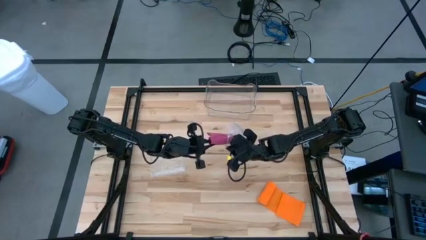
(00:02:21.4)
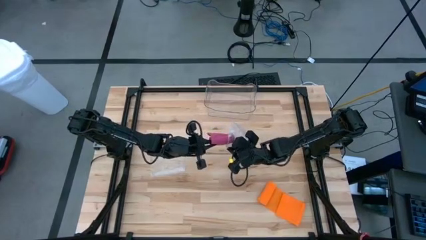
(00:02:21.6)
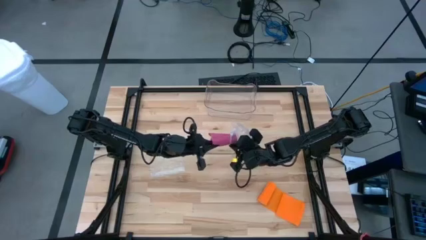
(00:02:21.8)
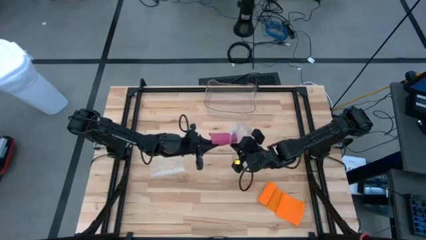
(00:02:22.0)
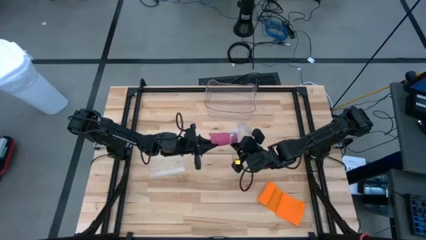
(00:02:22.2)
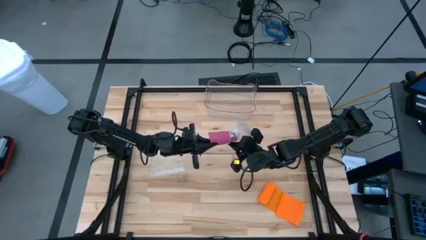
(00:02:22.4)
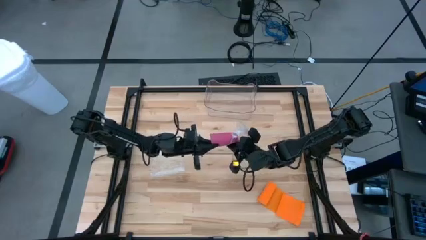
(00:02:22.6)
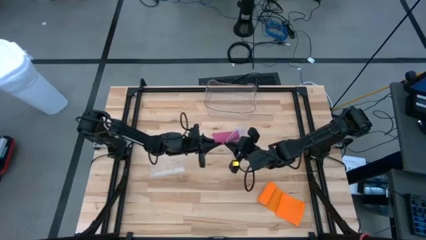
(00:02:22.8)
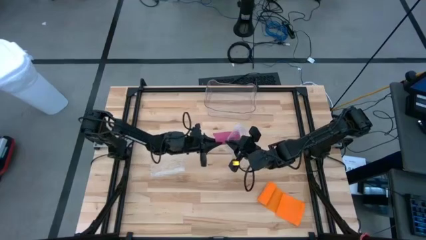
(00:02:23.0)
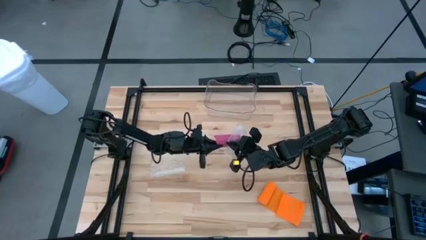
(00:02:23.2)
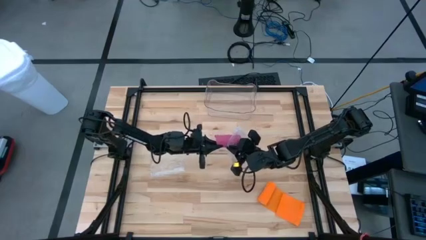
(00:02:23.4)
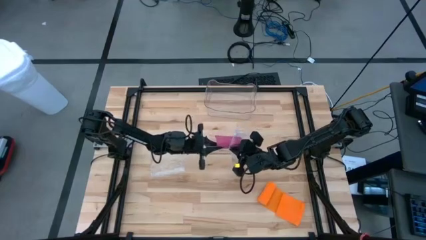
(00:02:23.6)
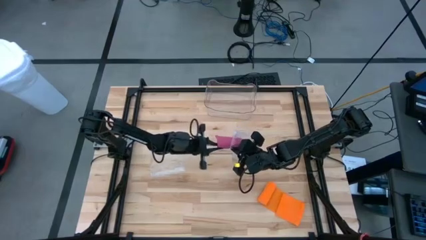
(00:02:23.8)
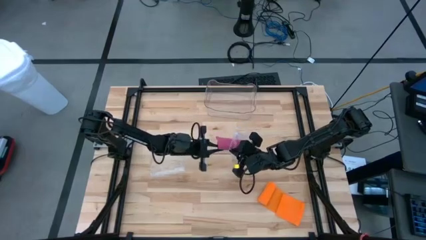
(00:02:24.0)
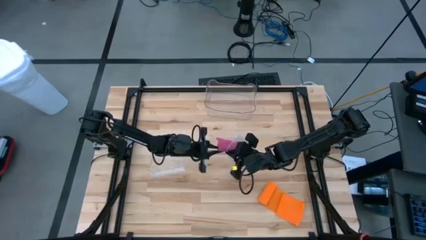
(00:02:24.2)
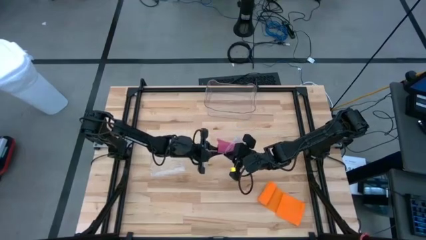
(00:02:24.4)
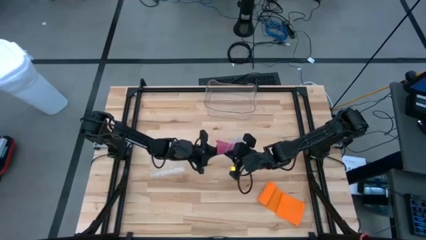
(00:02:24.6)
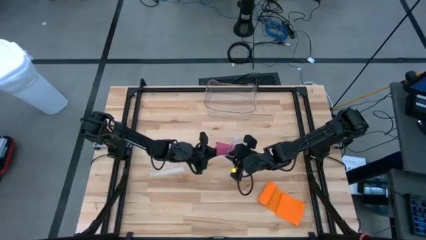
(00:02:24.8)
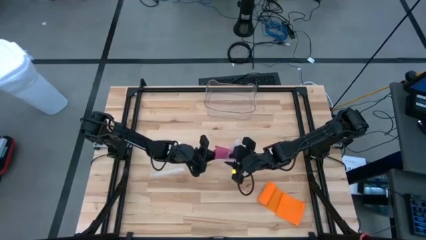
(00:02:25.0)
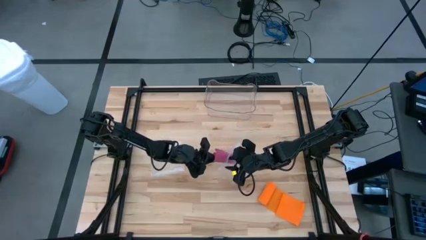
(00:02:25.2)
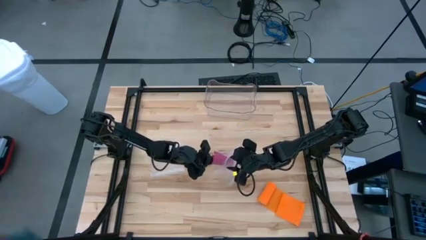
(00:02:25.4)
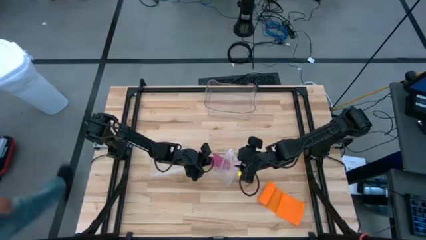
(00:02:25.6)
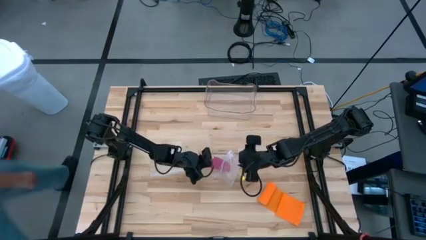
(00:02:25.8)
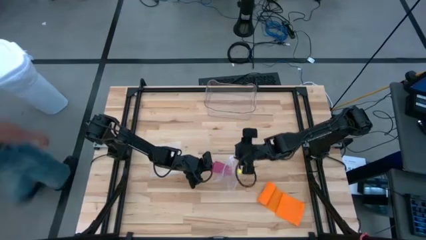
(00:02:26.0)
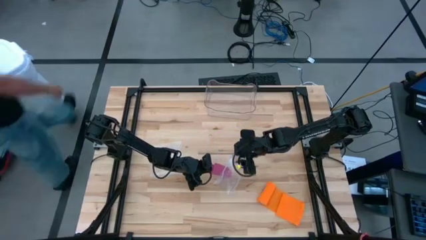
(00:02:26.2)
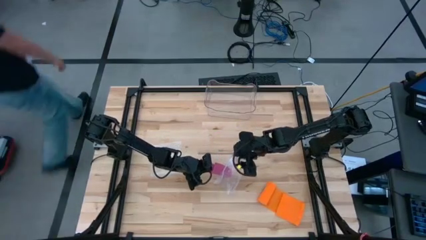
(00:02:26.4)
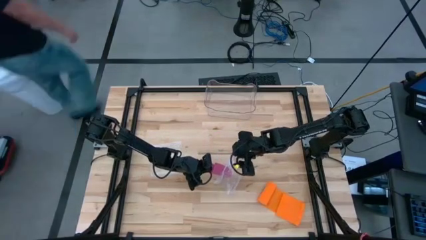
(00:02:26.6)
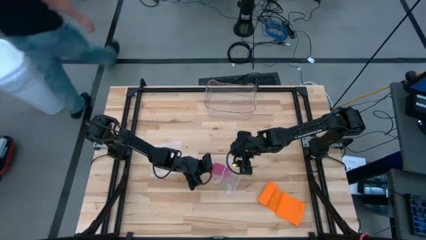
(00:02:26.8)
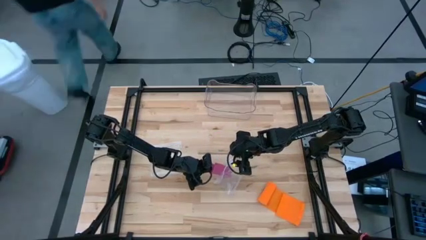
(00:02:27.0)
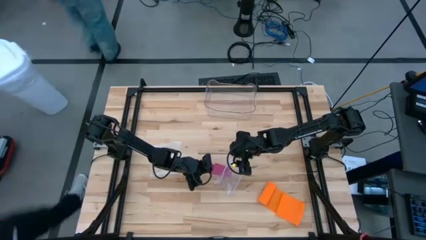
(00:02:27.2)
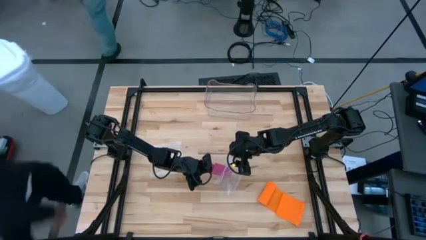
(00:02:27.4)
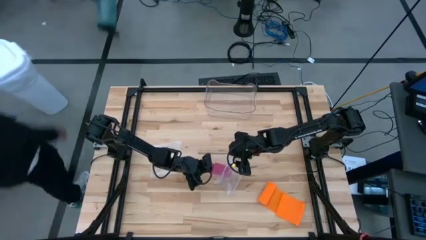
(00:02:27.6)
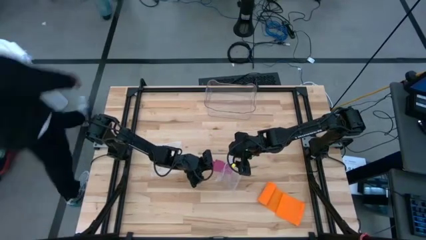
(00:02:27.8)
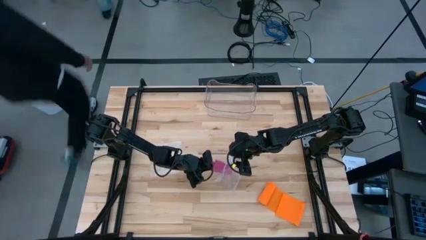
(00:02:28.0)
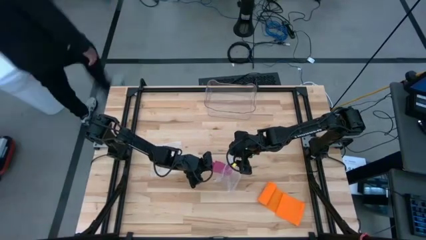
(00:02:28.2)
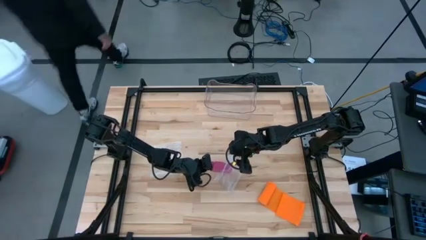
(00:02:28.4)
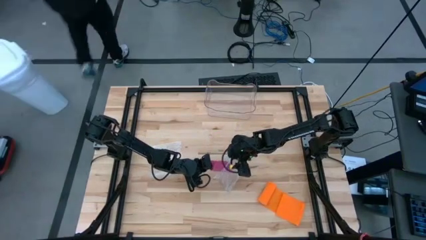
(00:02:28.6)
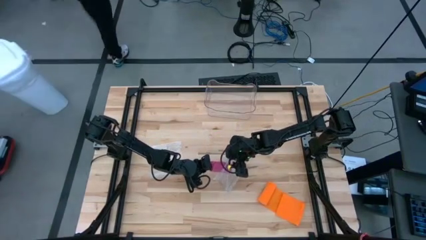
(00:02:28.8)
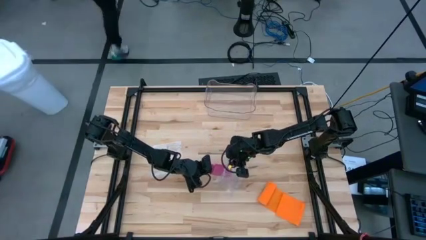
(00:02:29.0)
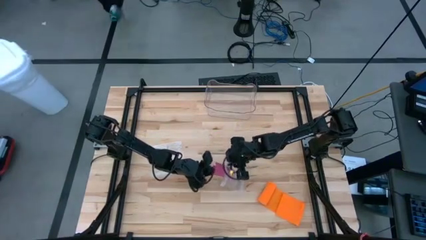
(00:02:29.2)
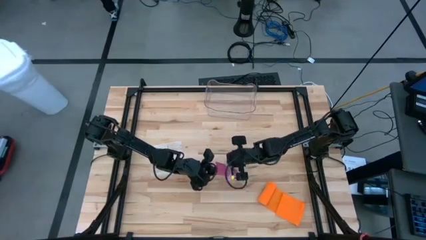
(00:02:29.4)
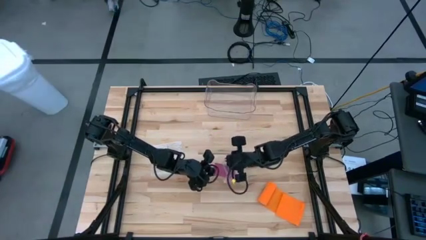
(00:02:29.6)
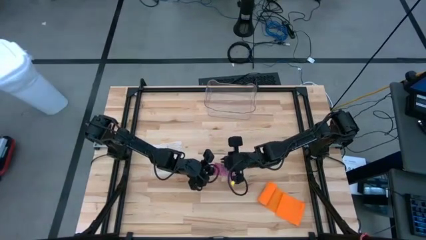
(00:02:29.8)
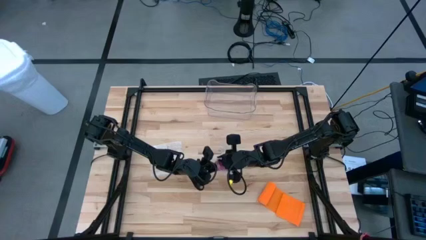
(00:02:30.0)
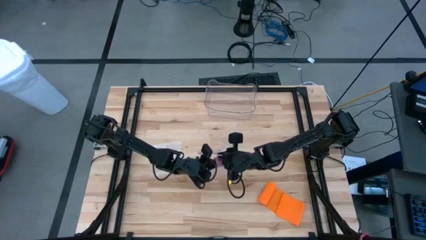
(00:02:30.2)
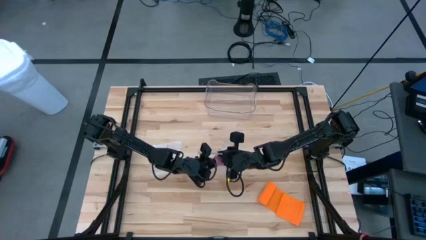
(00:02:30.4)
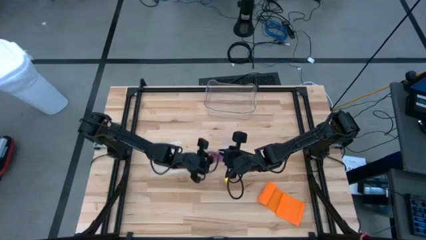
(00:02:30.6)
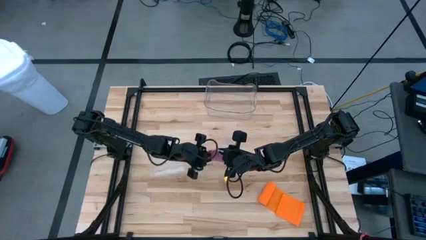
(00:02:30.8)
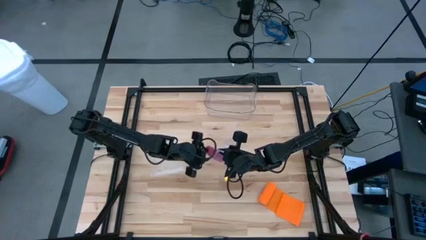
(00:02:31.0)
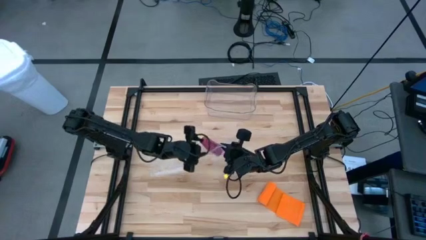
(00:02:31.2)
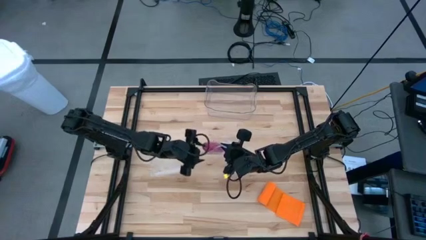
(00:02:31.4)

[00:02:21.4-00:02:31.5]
Task: Roll bandage
Put the pink bandage into the zip bag
